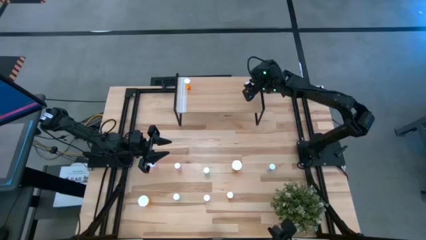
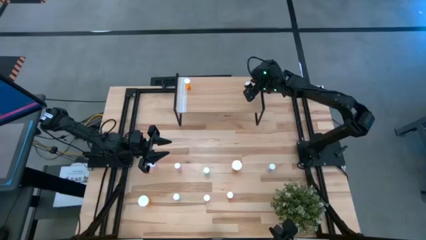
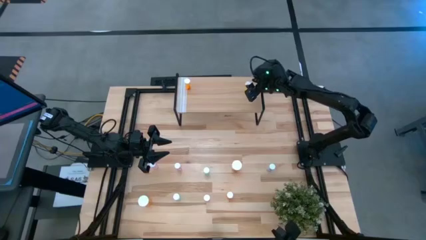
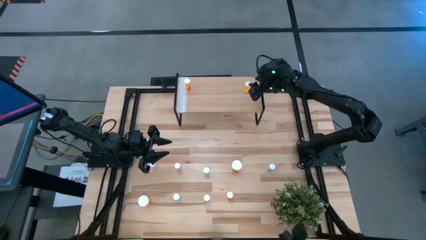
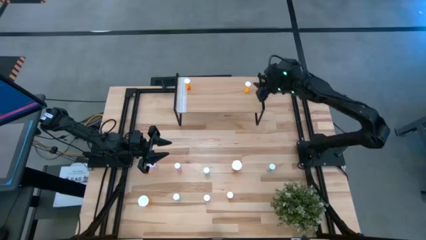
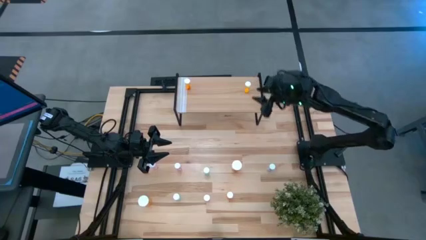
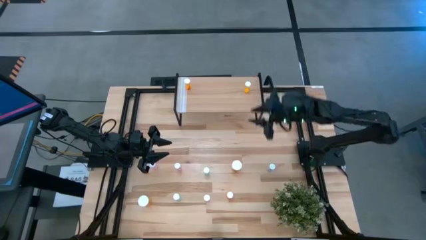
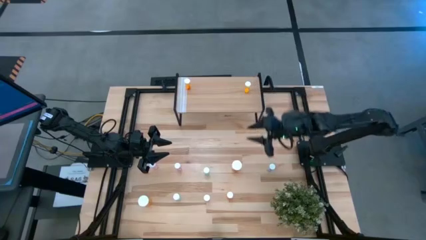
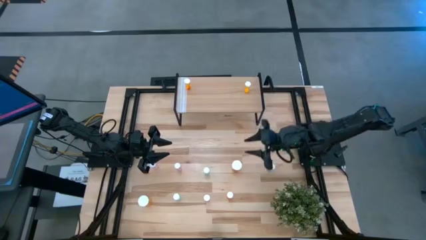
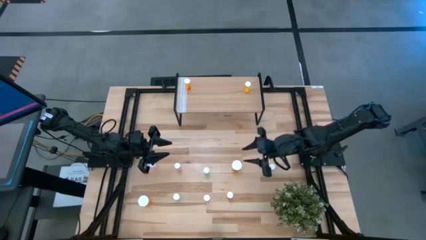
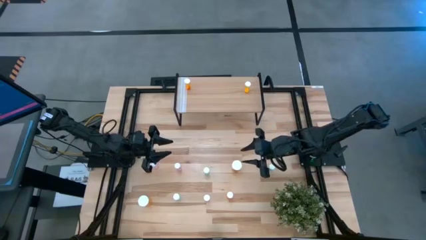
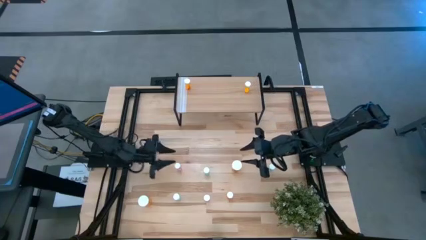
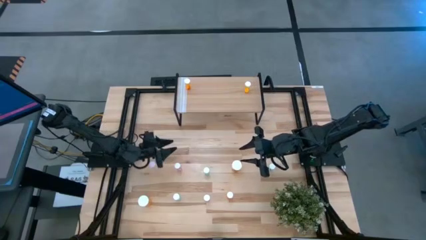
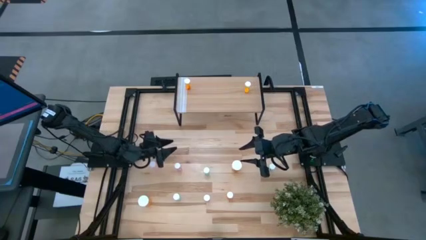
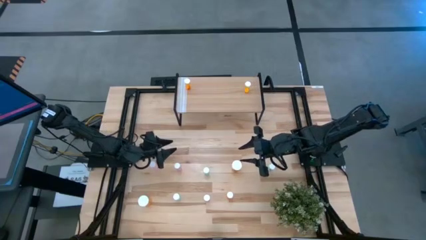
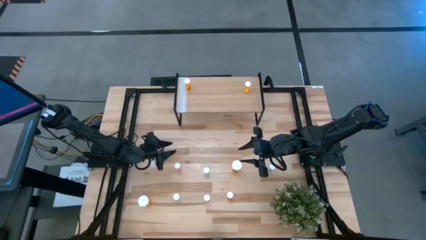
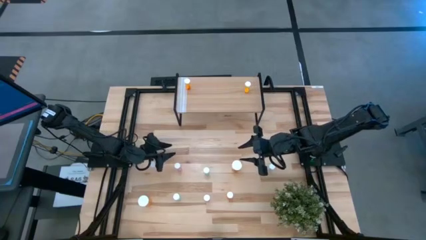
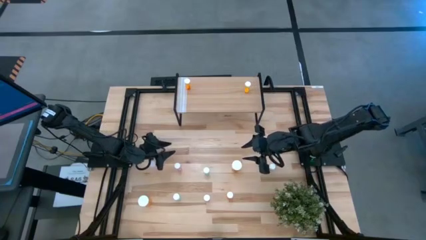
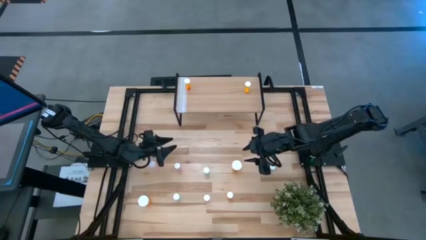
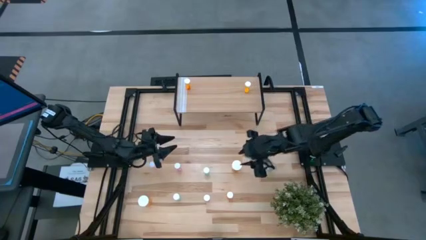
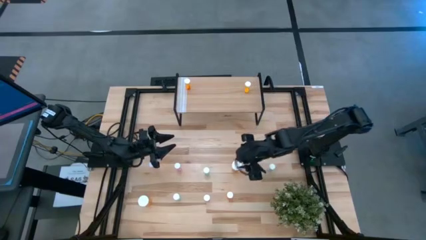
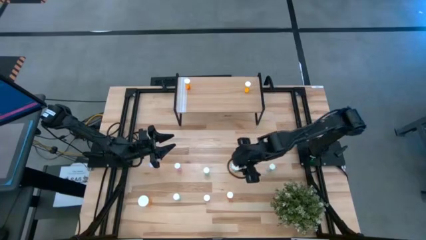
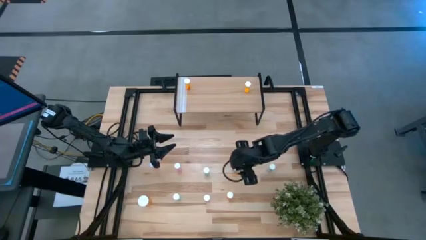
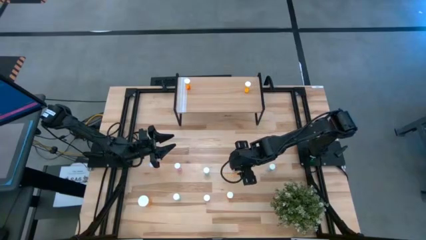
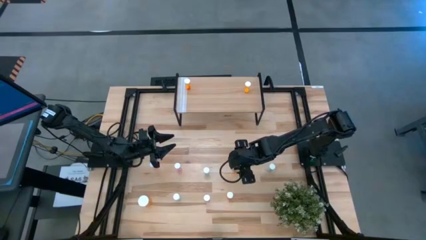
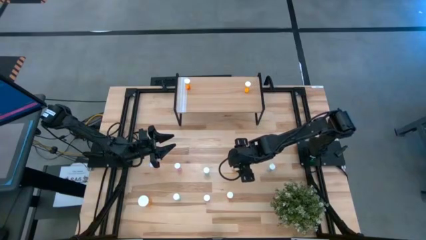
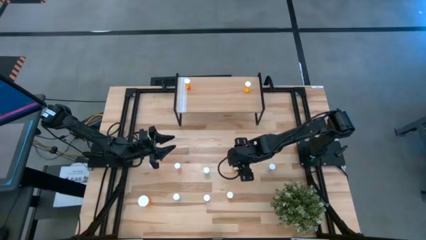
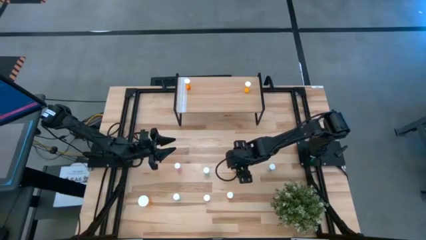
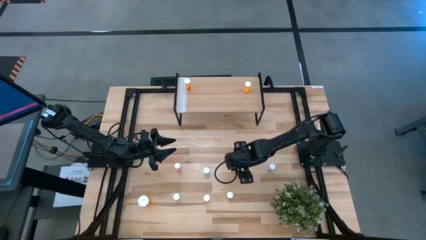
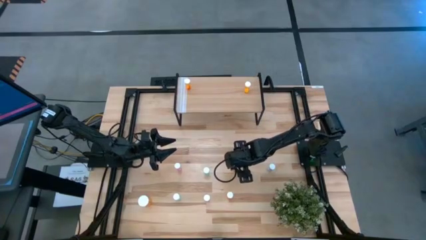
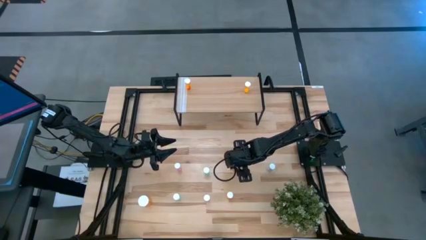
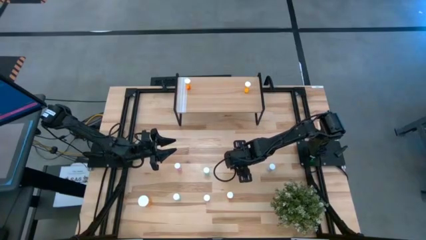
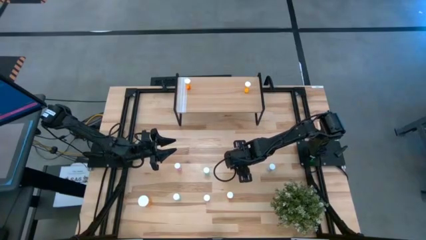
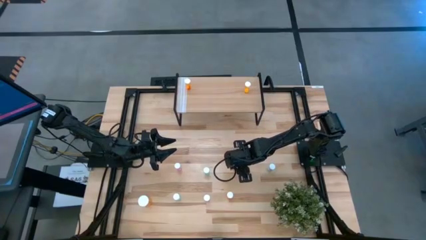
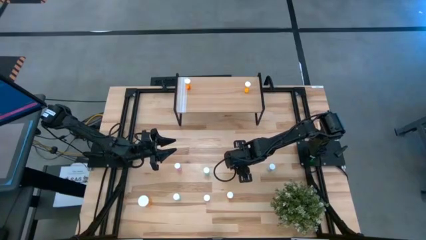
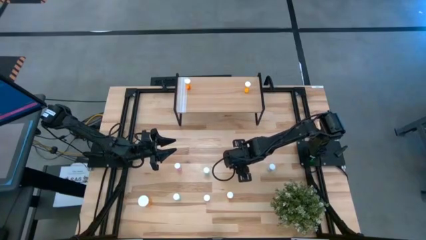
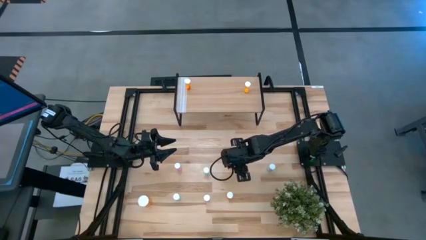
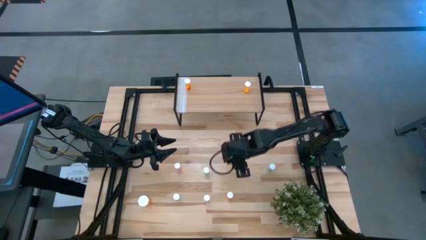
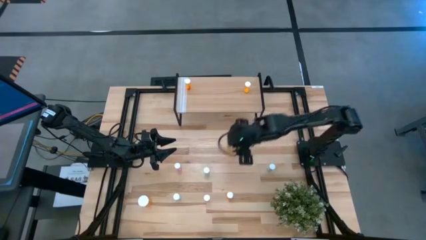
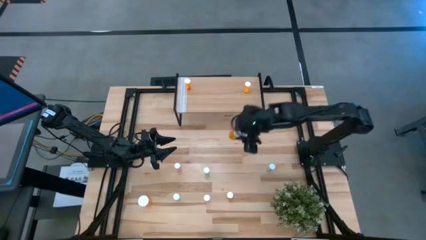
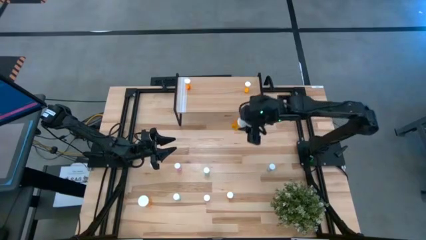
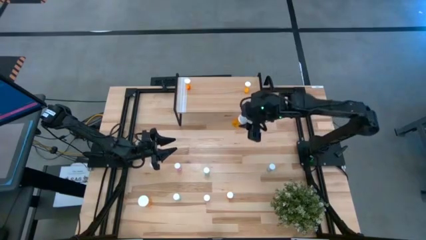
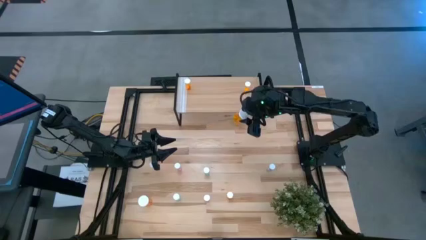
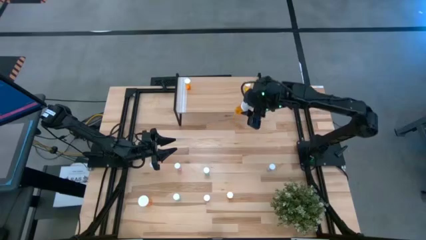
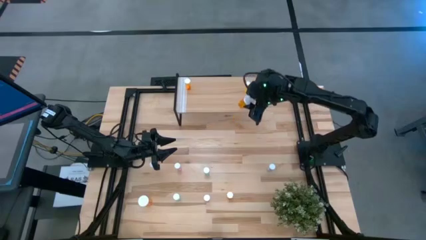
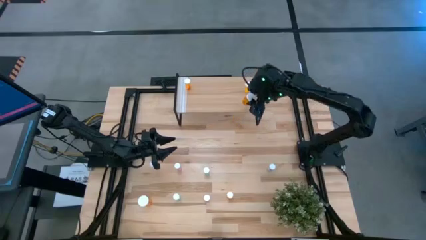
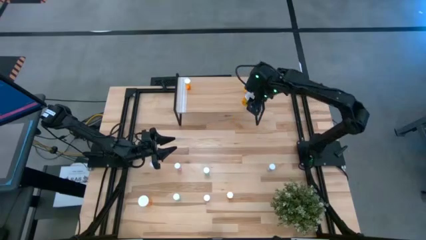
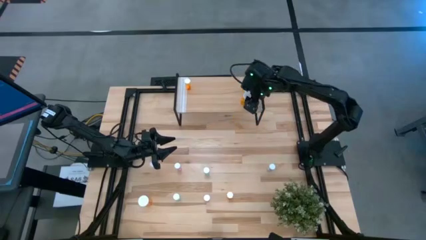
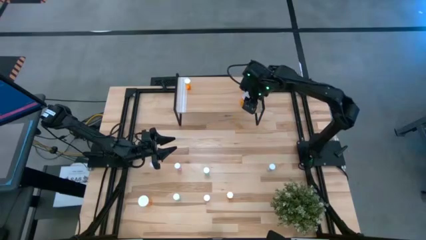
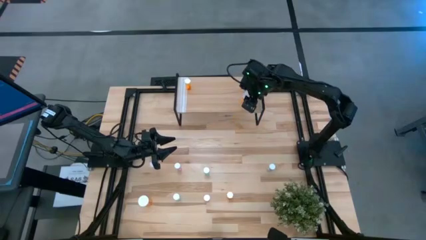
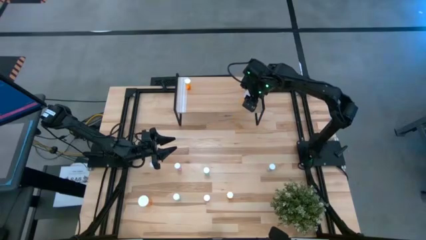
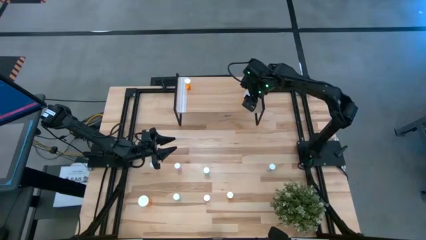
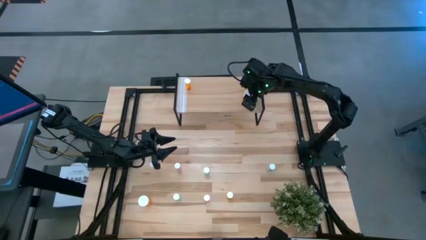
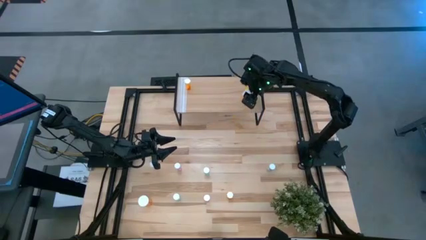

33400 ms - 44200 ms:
Task: Pick and place medicine bottles onto shelf by color
Put the top large orange pill bottle on the shelf

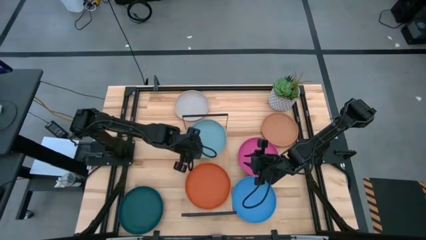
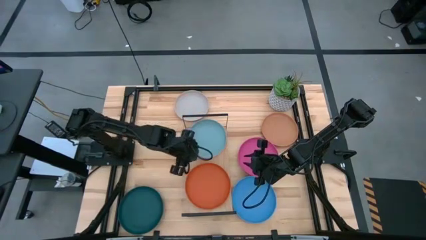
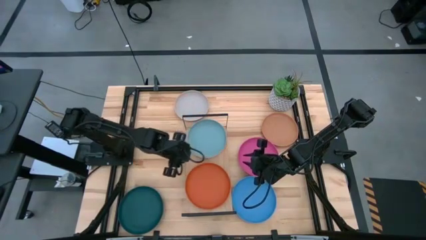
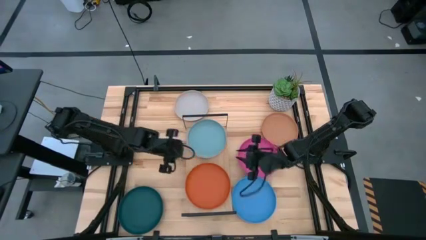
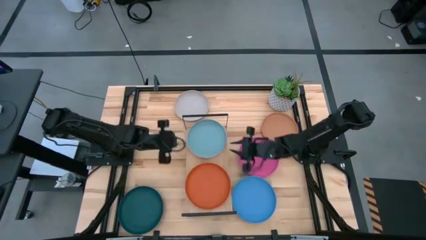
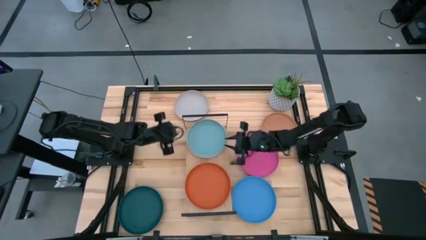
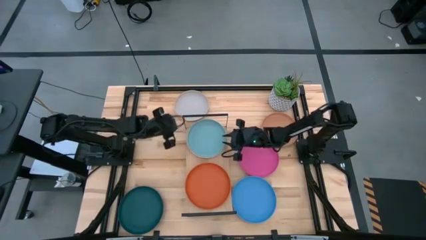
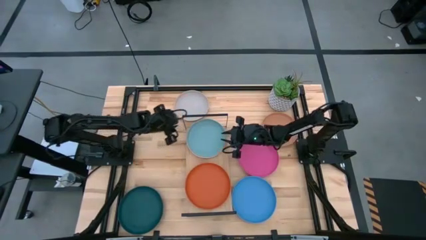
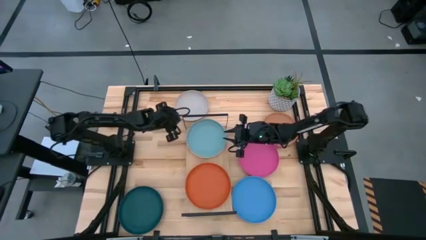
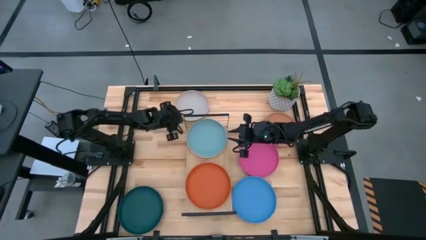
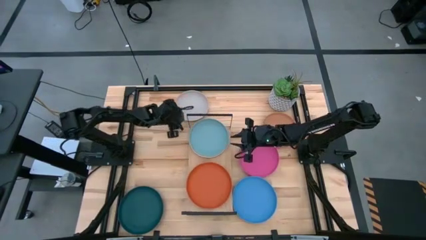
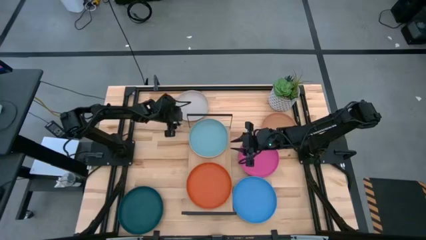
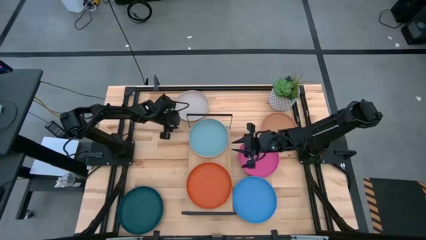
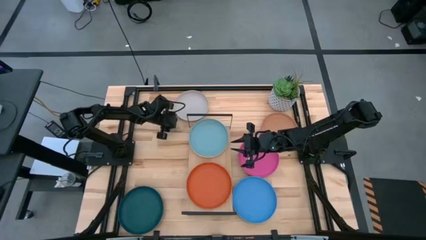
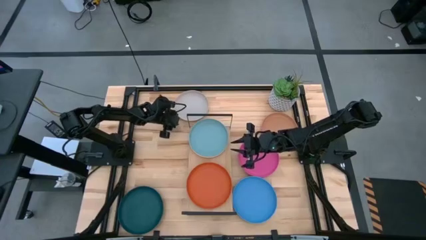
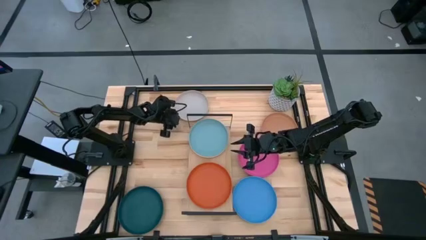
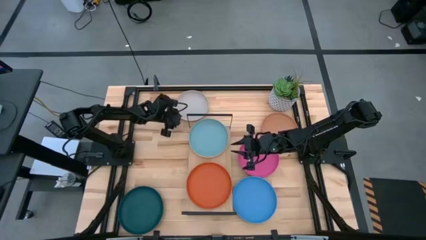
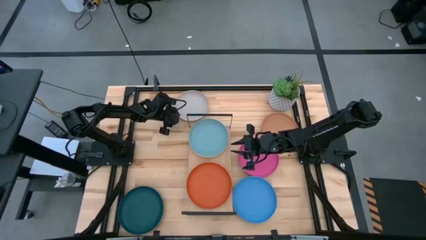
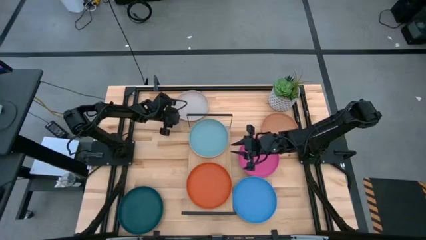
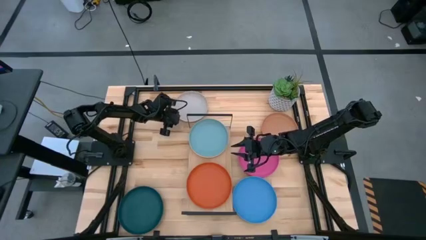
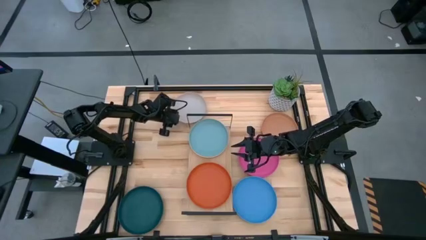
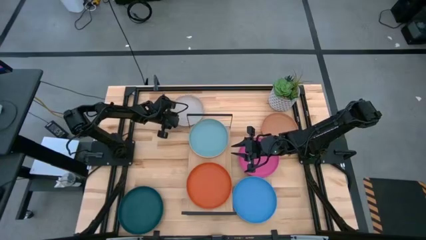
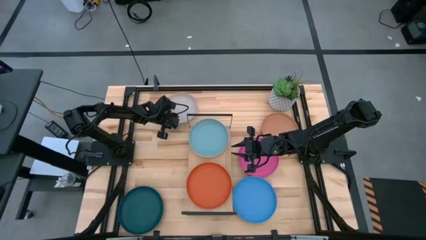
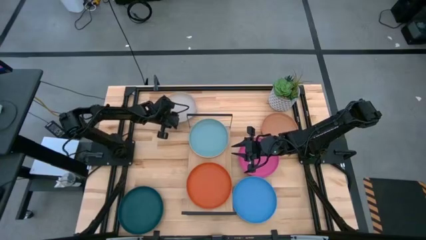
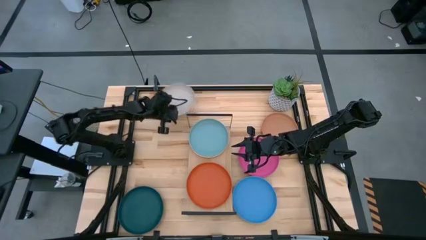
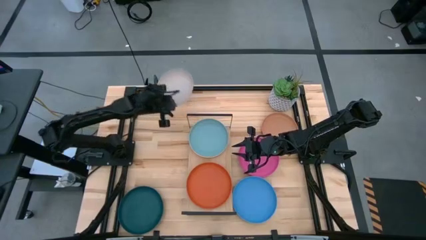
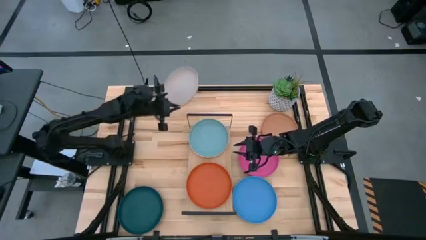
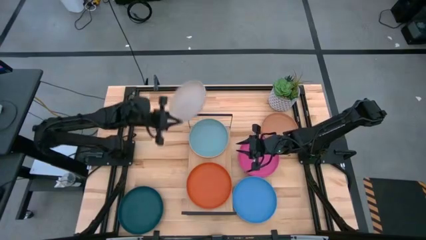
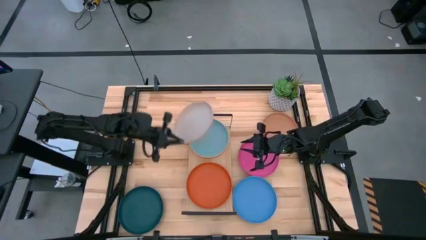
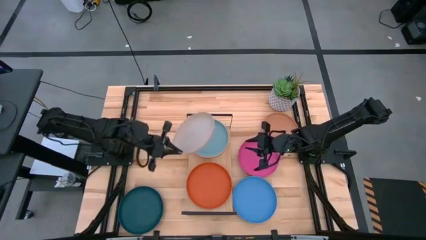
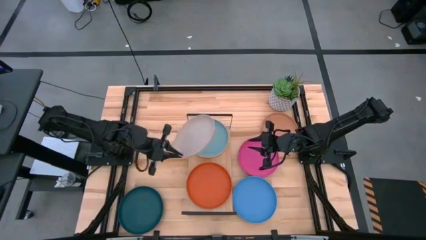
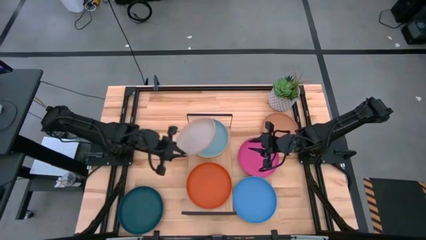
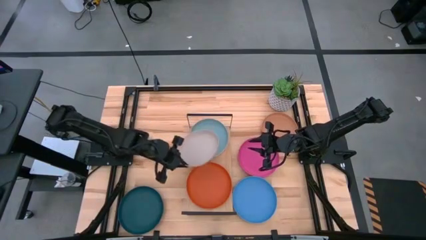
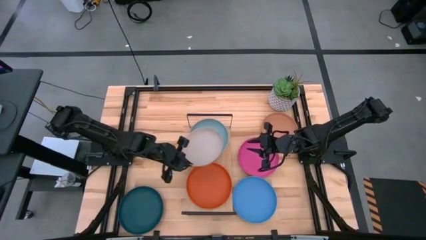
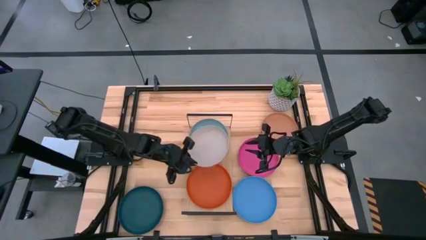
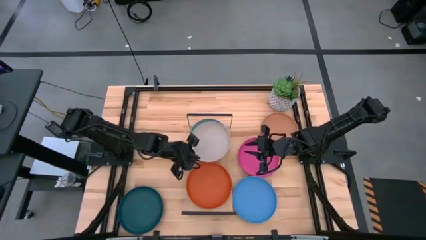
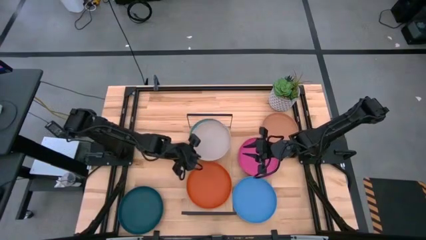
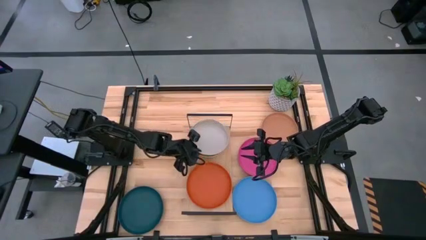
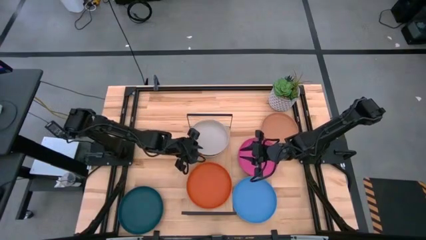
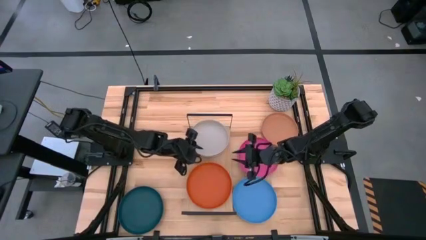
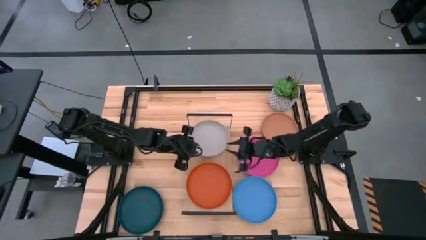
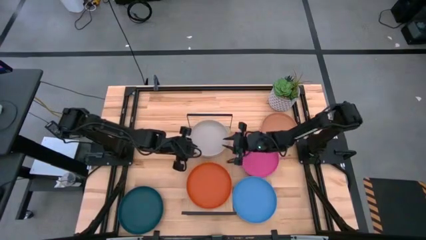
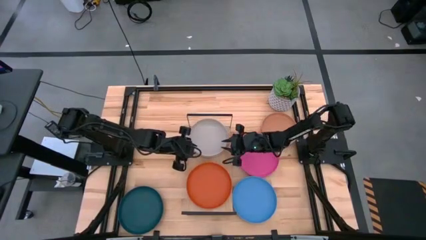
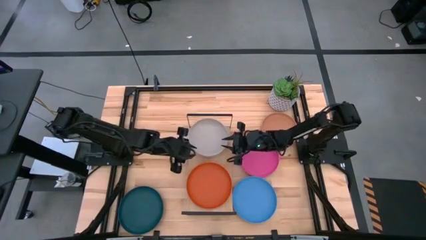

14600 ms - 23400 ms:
Task: Place and stack plates onto a shelf
Stack the gray plate on top of the light blue plate on the shelf
